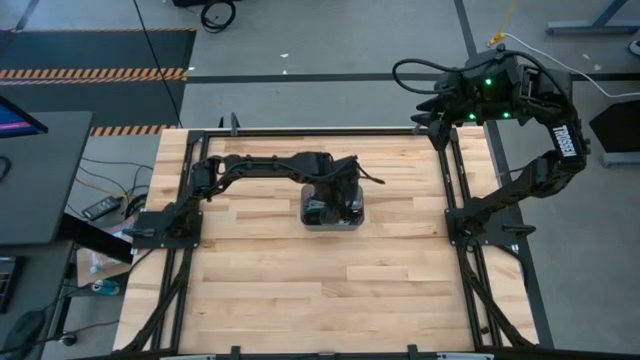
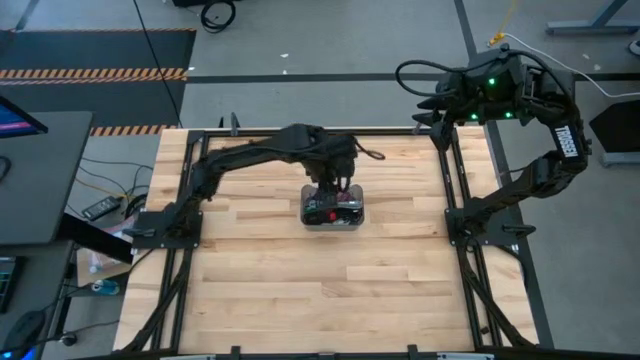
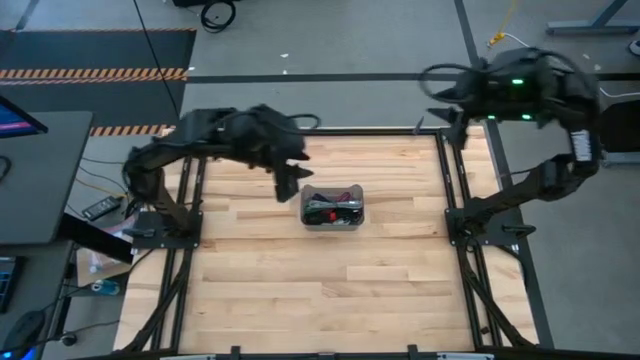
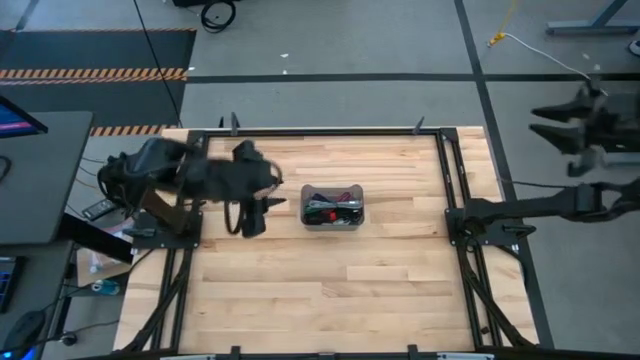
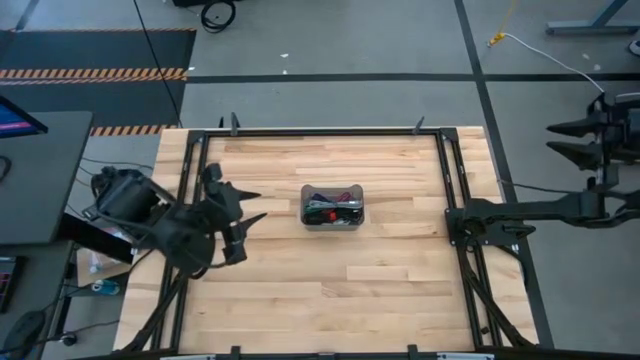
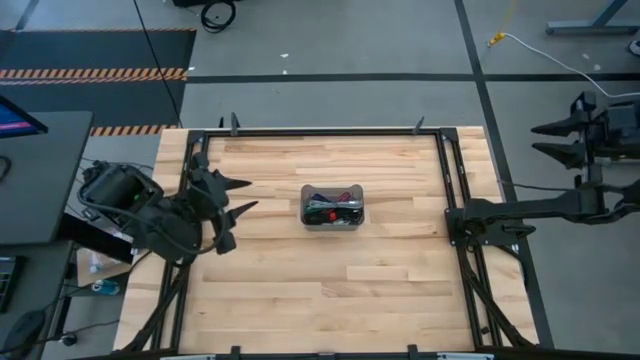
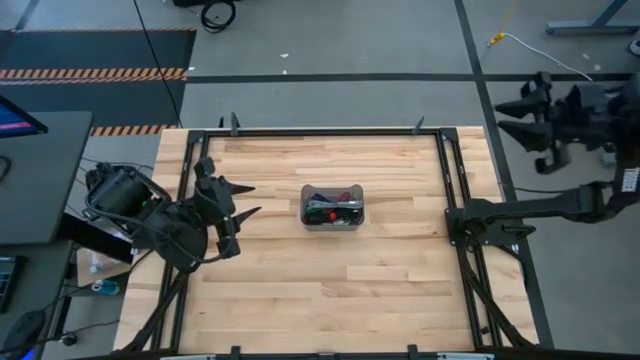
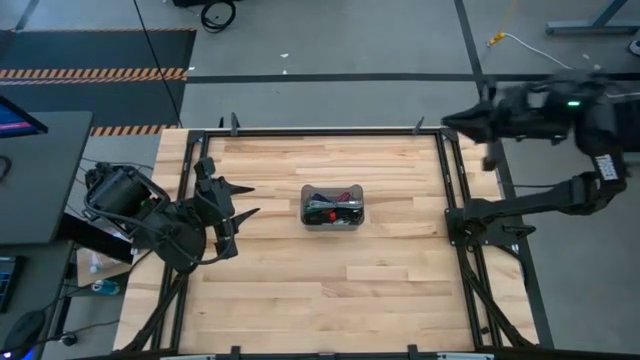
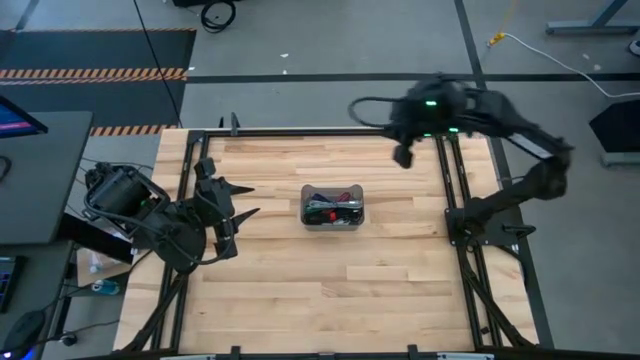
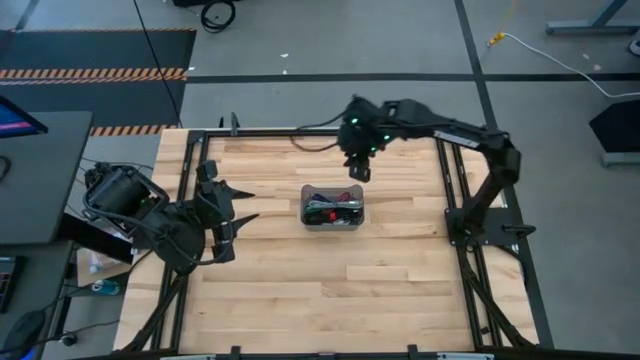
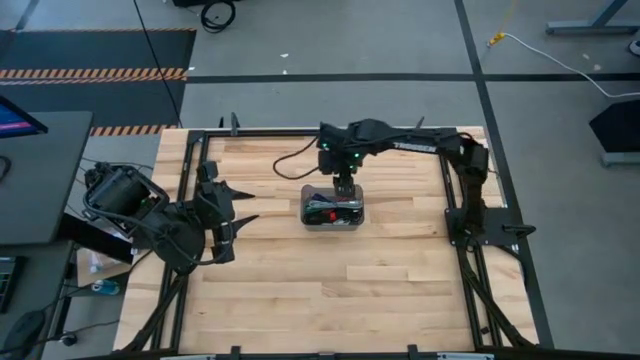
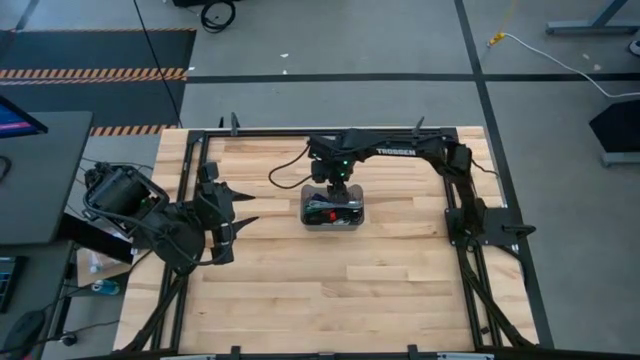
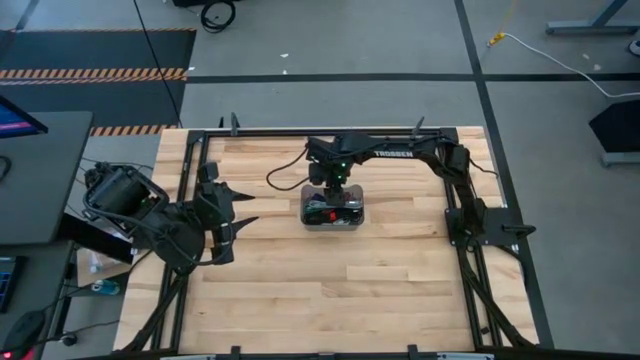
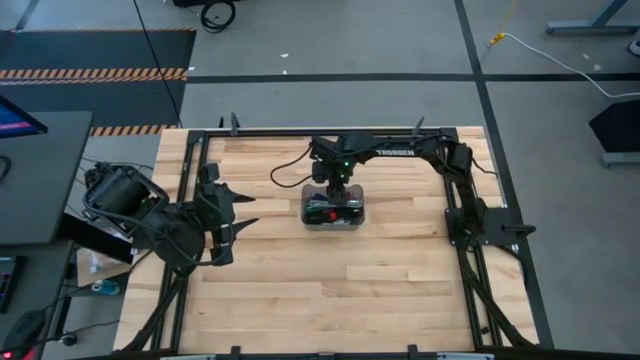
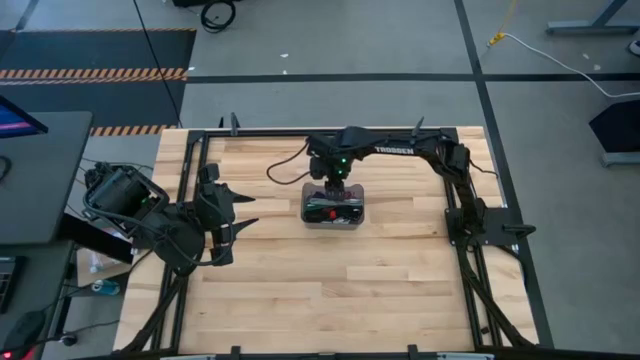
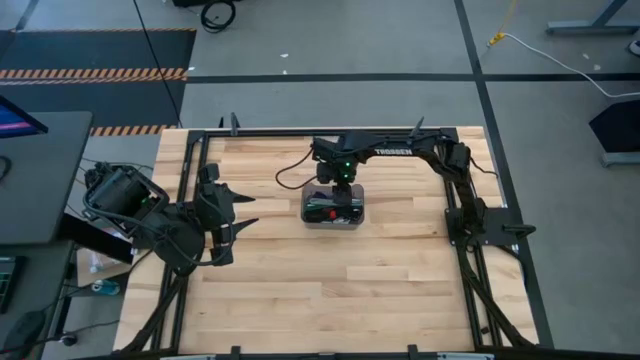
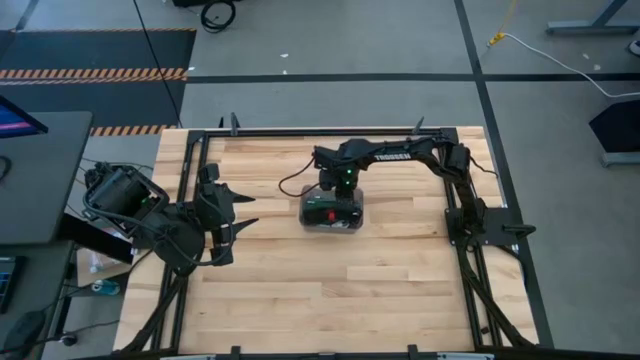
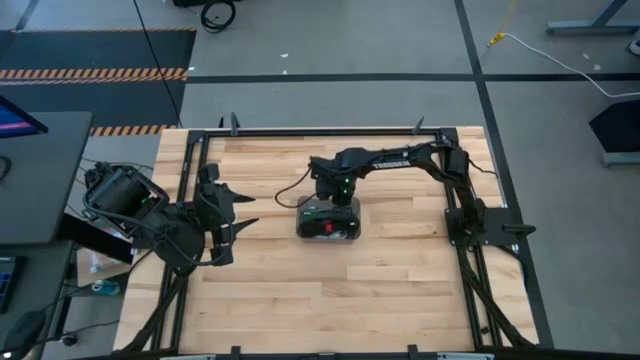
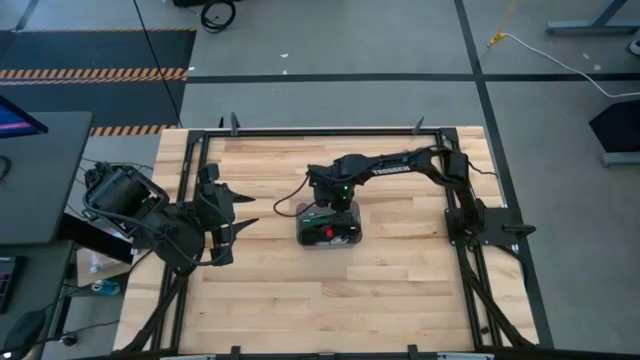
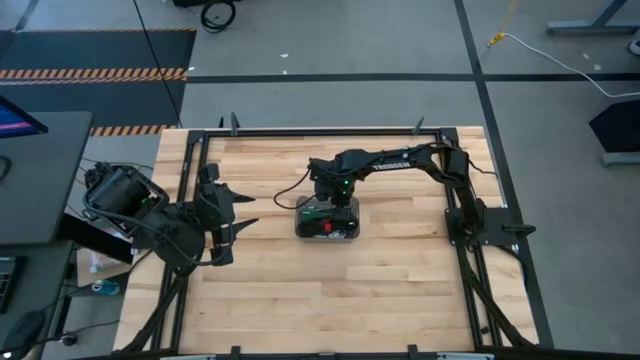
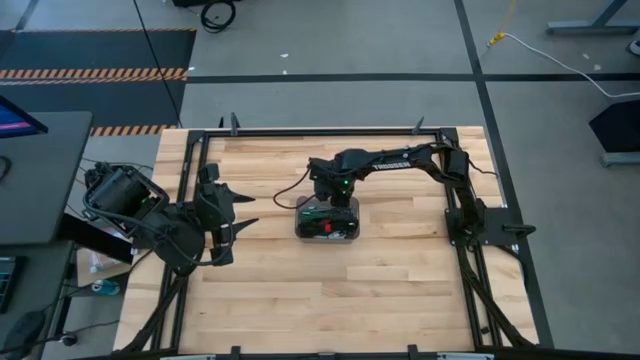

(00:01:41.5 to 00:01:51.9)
Task: Pick and place USB-C Cables
Adjust the black bin

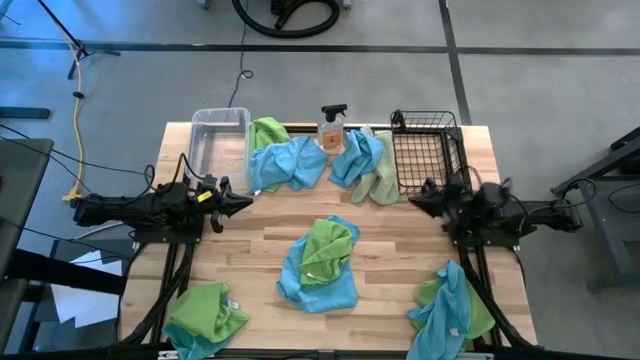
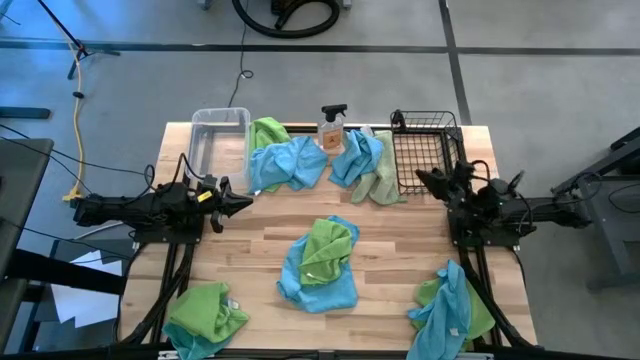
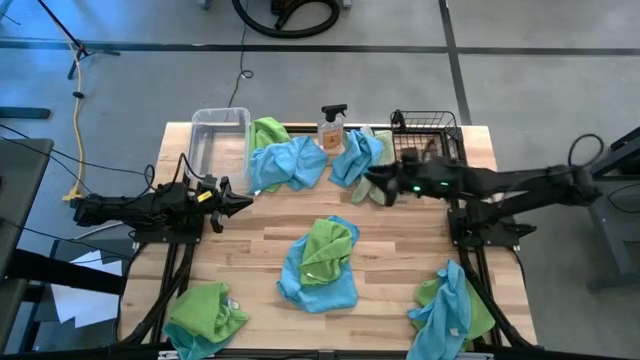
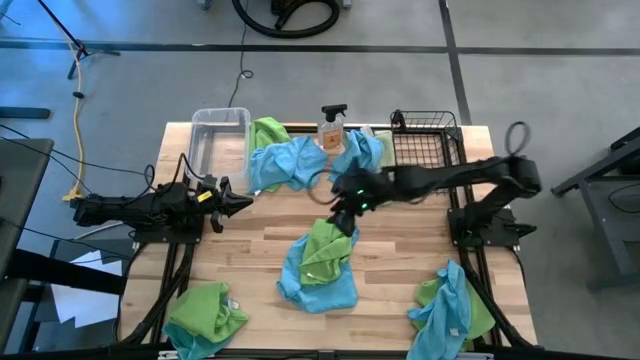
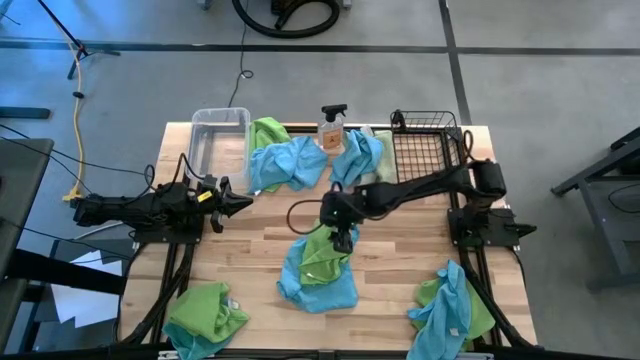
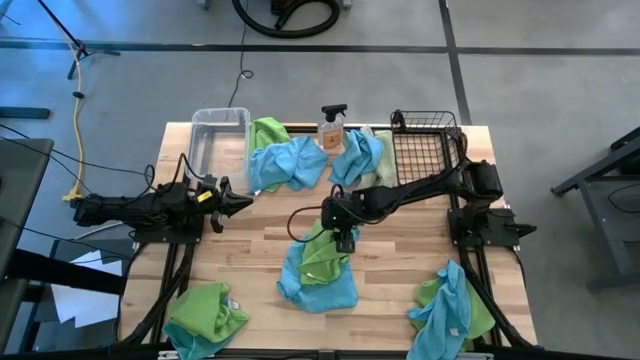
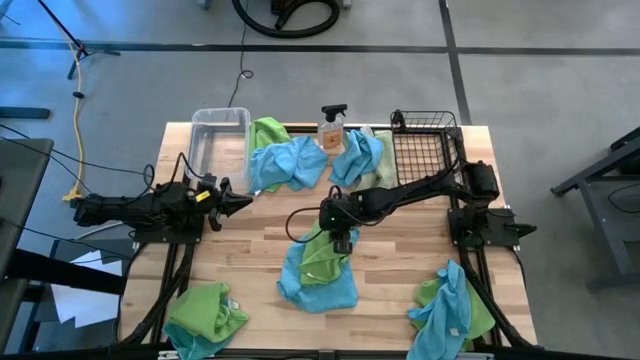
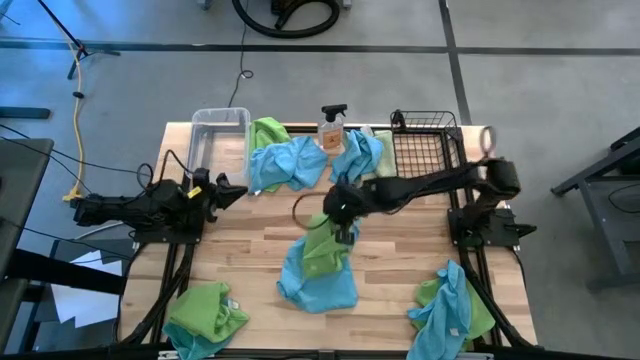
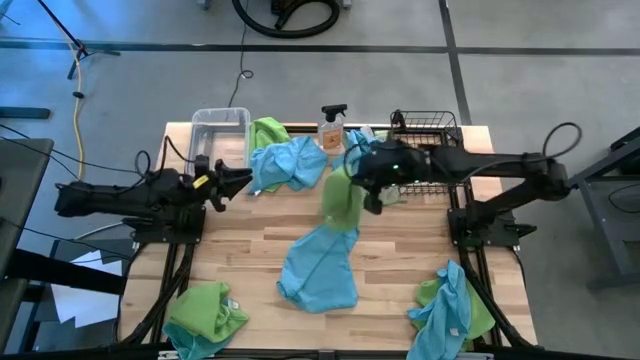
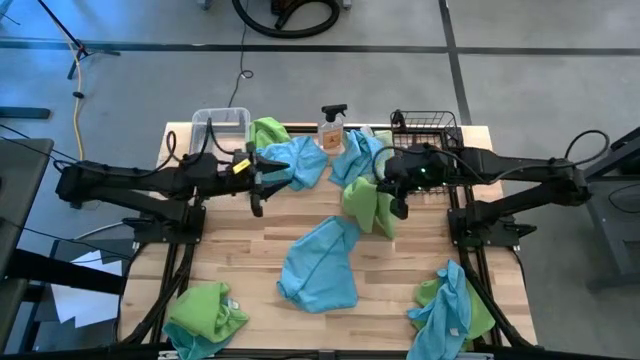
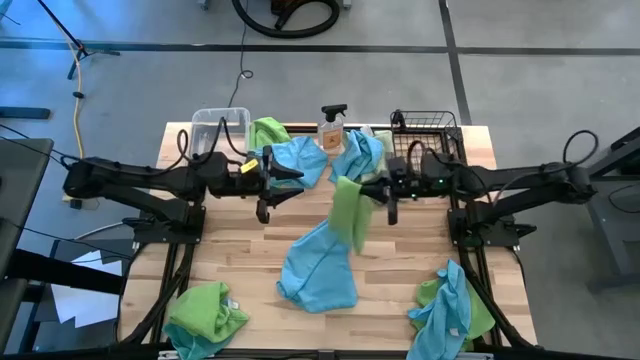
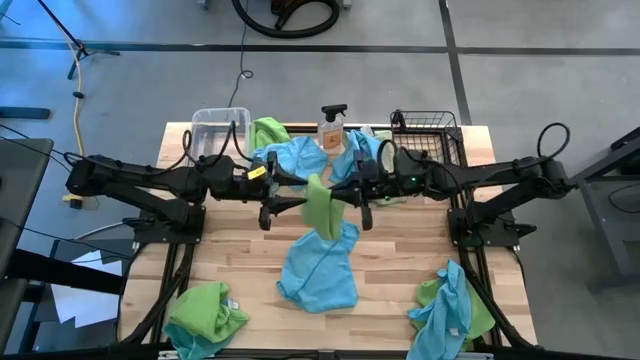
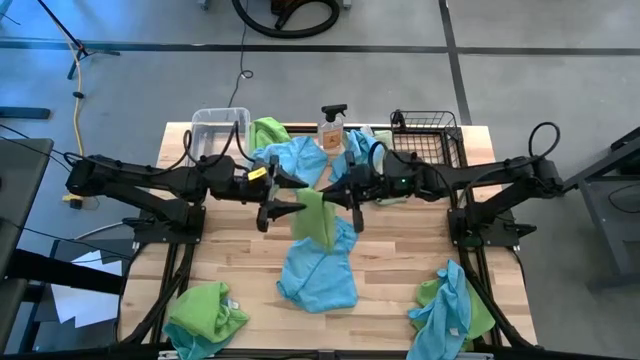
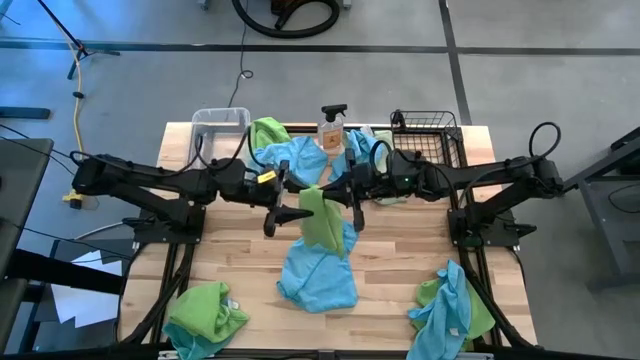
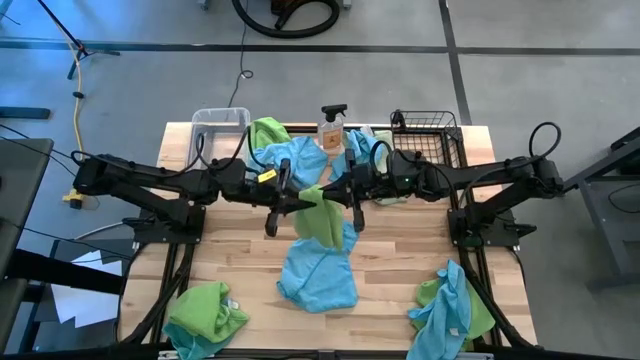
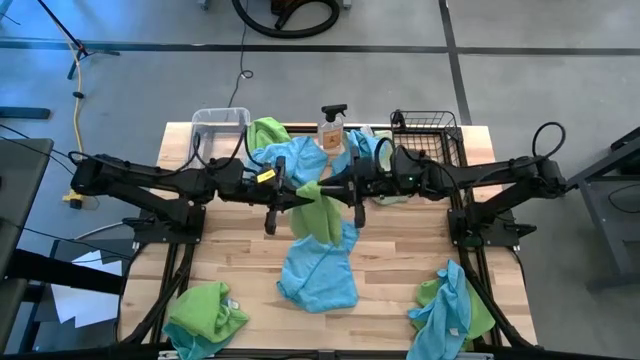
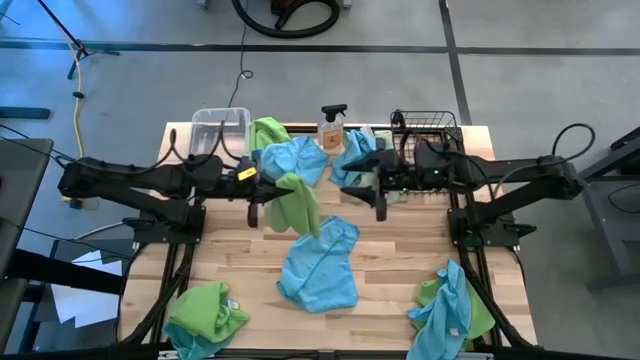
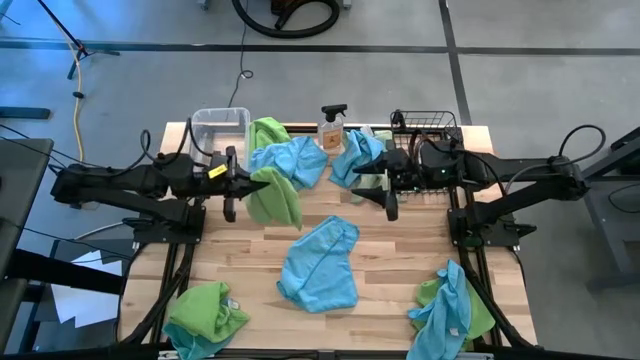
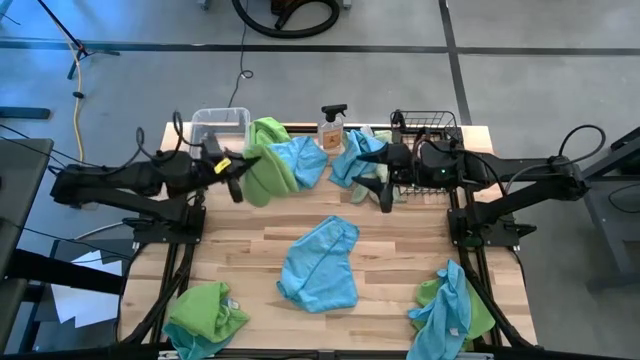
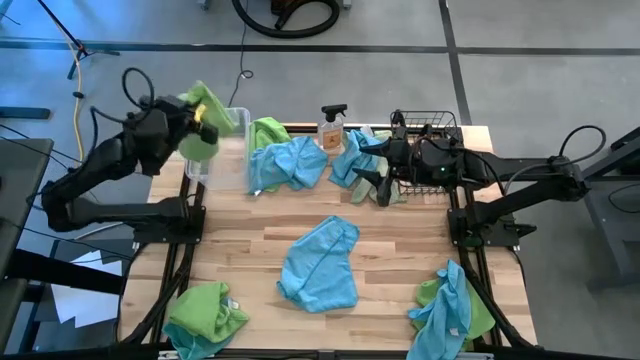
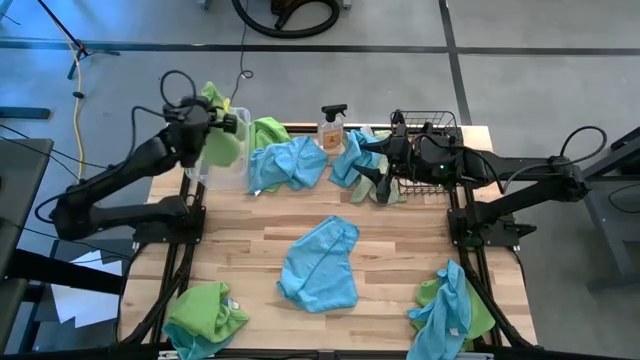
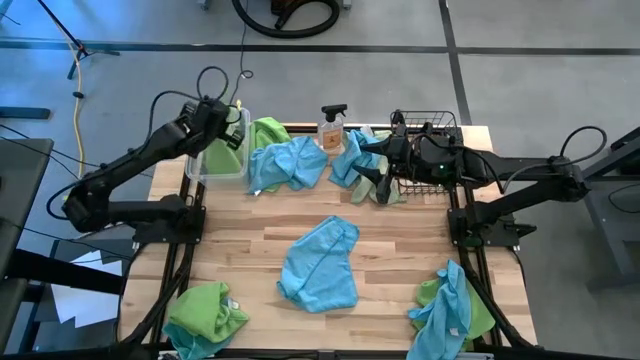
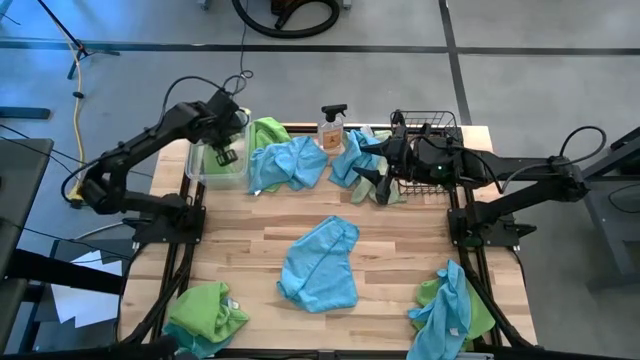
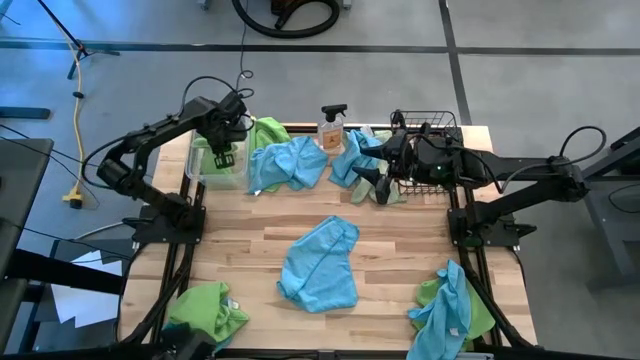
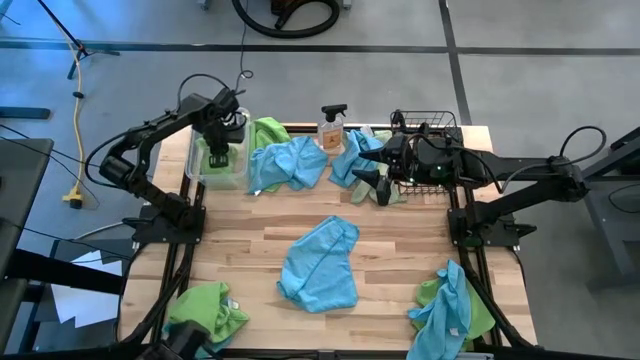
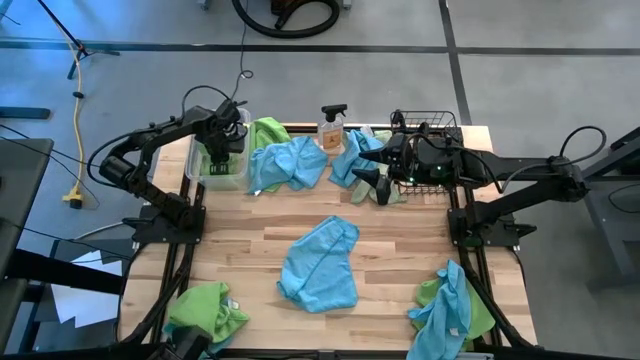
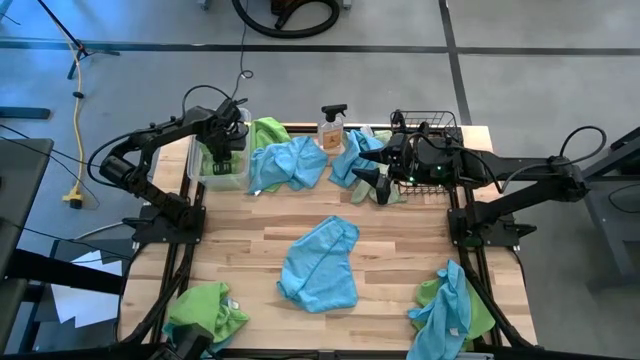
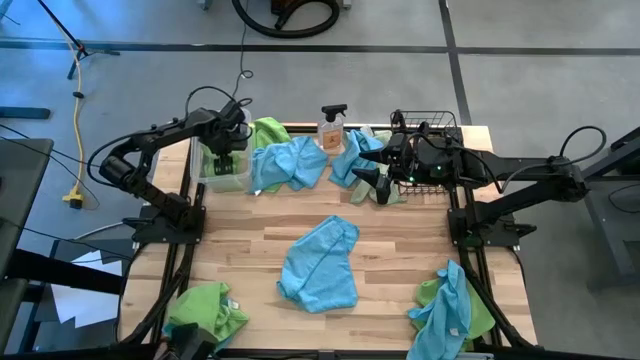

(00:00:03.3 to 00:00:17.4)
Task: Sort microfiber towel by color & place in baskets
Put the green microfiber cloth into the bin
